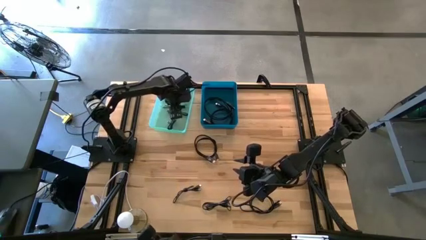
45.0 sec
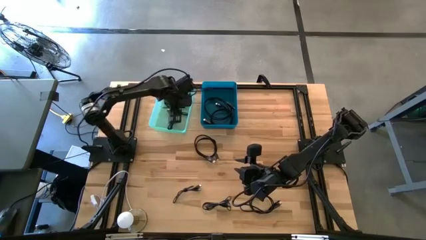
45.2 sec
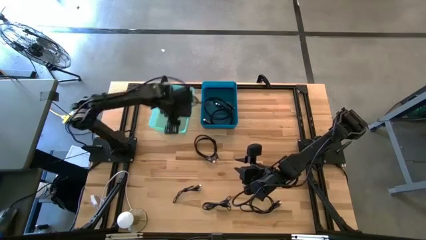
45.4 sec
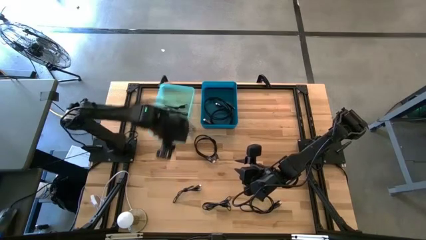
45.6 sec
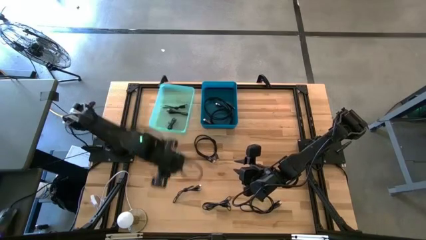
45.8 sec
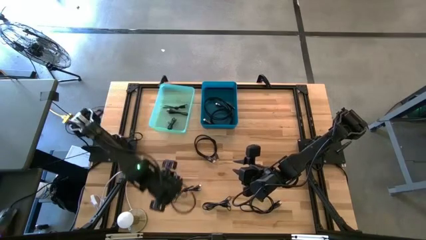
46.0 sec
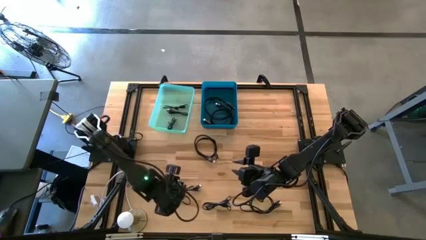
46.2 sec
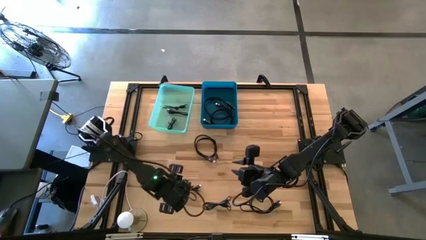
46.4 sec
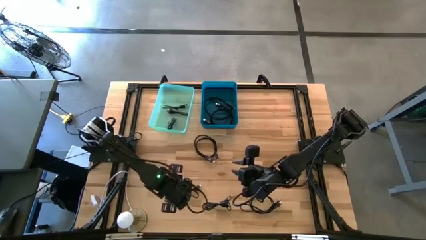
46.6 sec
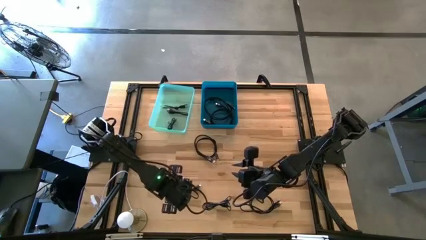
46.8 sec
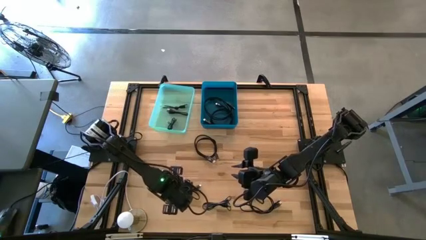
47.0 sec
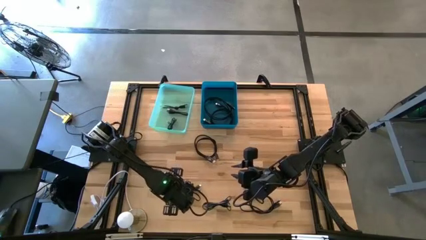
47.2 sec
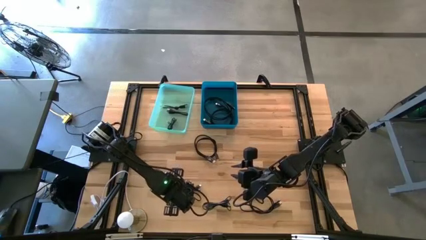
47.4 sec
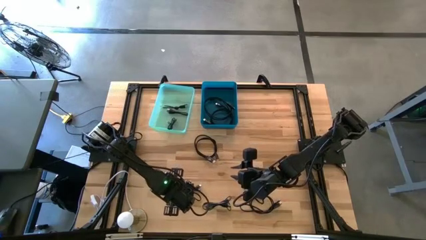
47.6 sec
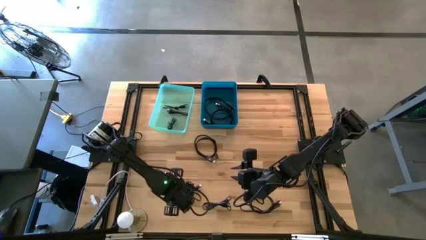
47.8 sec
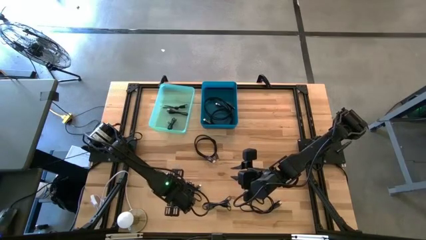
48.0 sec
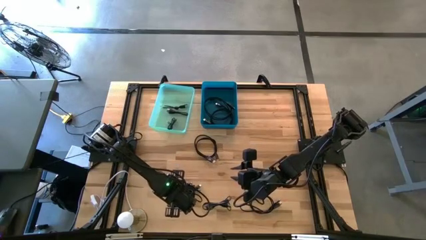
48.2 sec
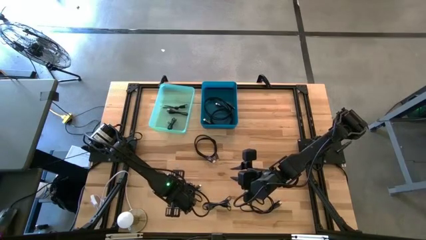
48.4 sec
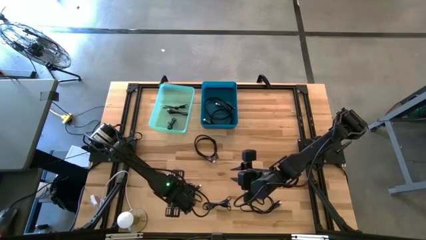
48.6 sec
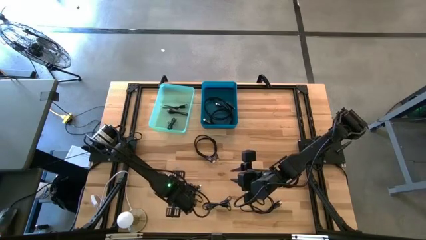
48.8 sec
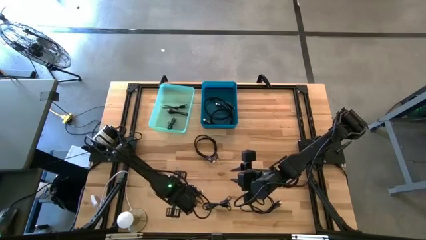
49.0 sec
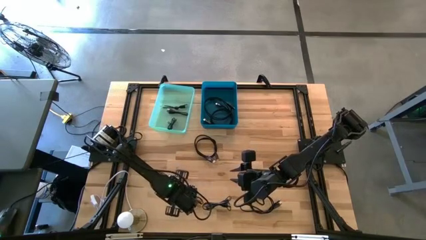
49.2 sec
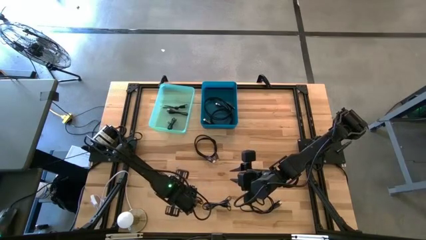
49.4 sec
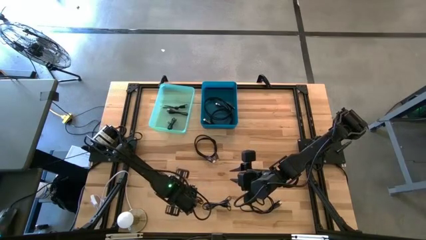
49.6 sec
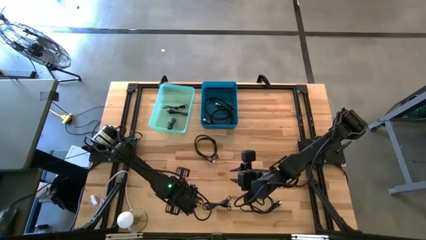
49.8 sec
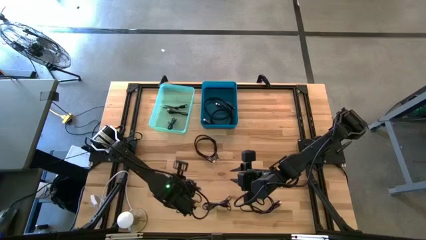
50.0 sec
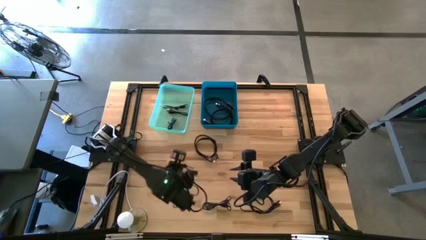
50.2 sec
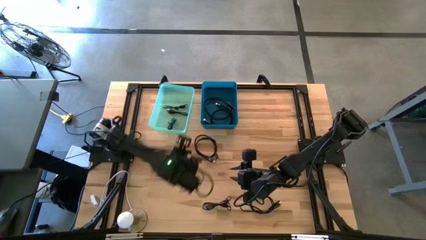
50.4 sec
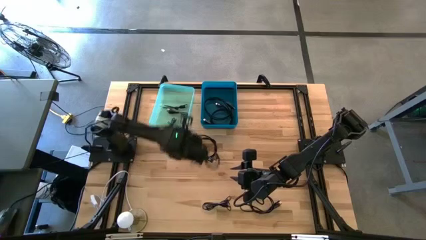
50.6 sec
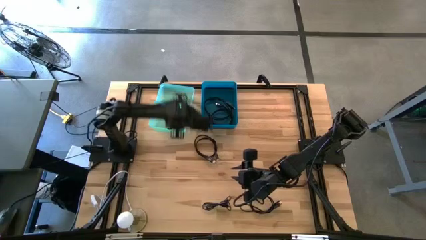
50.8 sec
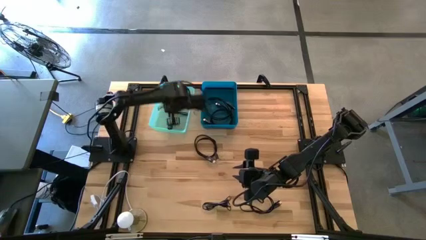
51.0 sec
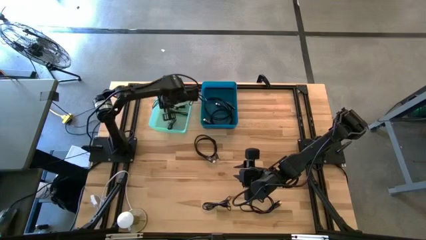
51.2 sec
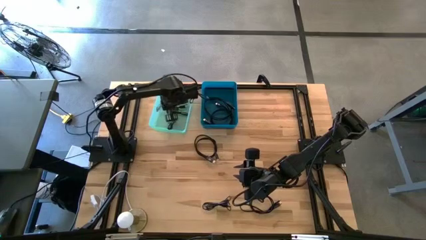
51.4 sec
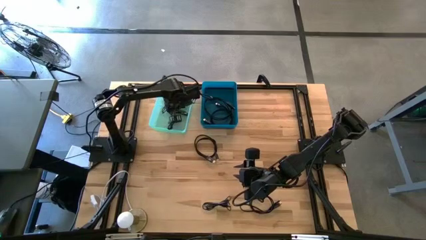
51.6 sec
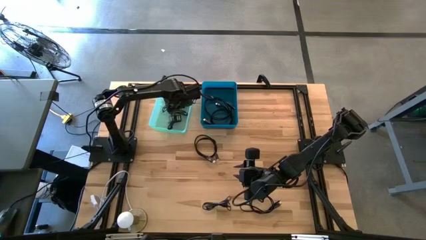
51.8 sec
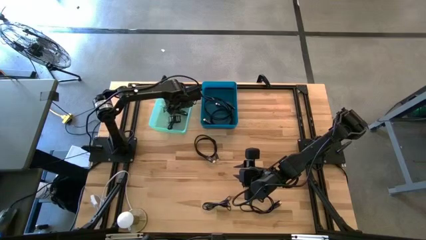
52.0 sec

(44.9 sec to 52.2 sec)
Task: Pick & Place USB Port
Put the black USB cable into the green bin

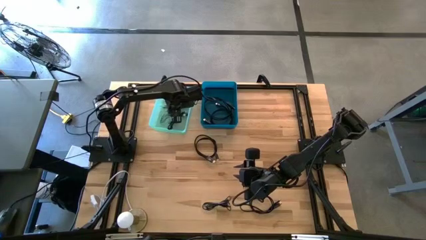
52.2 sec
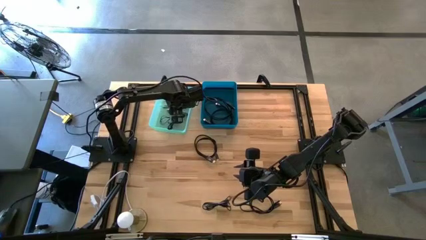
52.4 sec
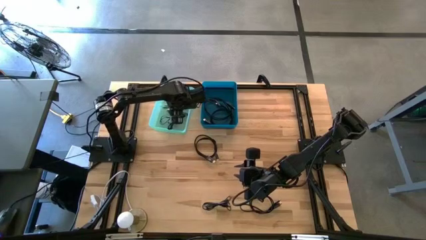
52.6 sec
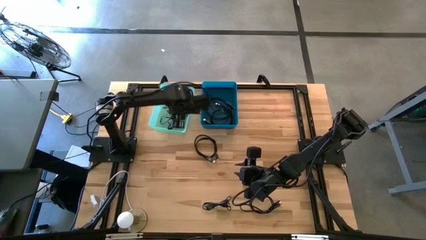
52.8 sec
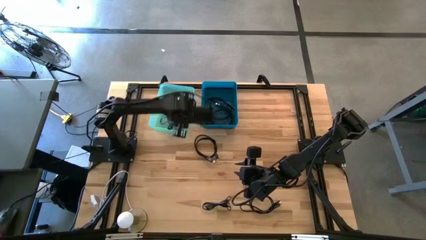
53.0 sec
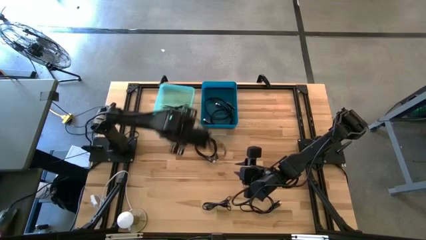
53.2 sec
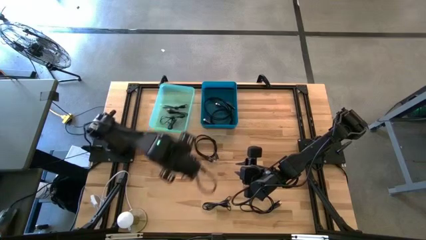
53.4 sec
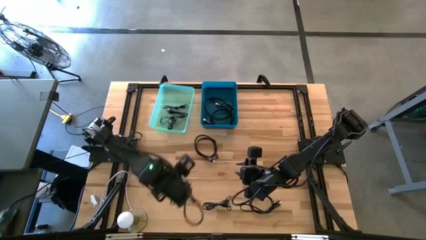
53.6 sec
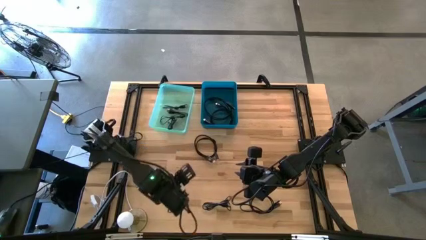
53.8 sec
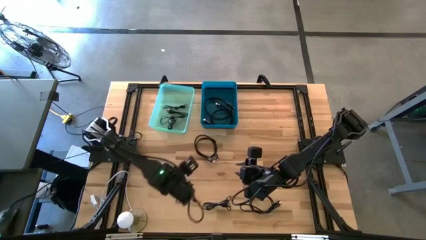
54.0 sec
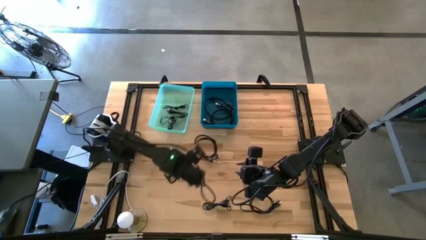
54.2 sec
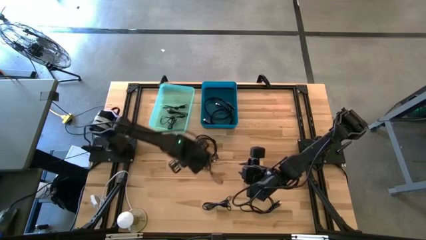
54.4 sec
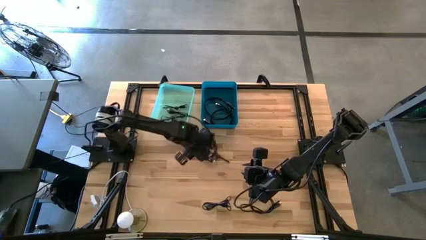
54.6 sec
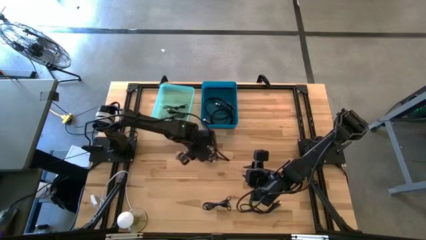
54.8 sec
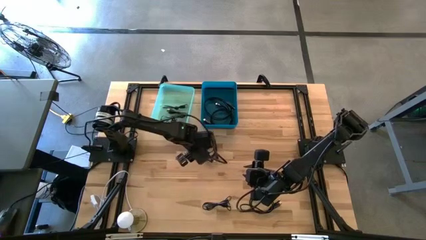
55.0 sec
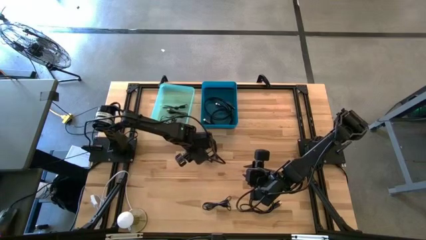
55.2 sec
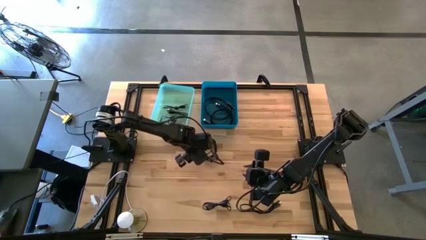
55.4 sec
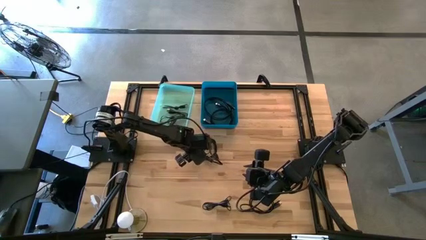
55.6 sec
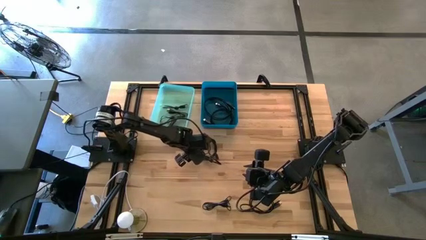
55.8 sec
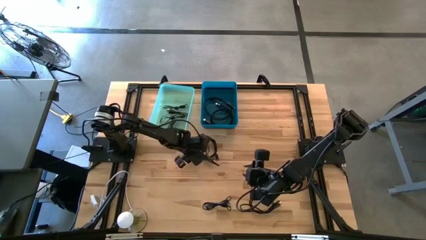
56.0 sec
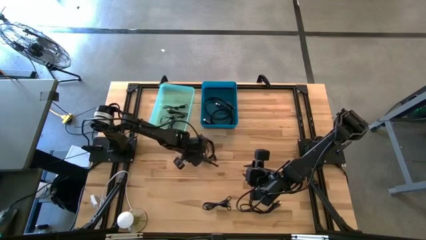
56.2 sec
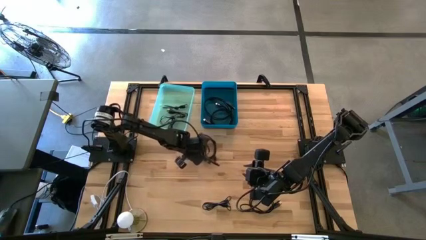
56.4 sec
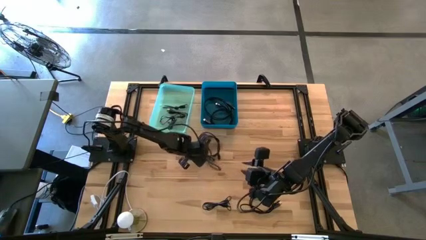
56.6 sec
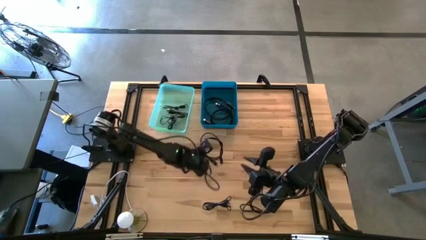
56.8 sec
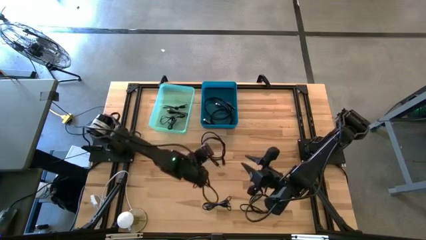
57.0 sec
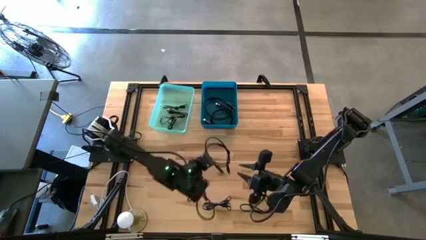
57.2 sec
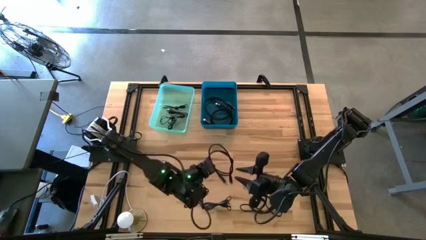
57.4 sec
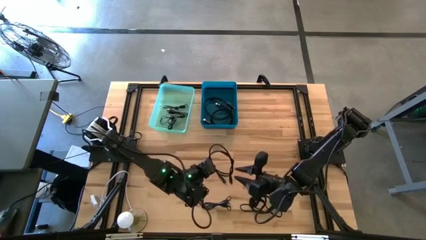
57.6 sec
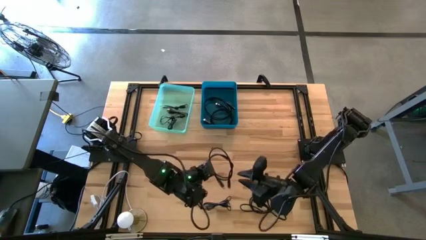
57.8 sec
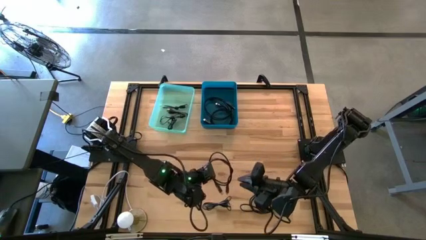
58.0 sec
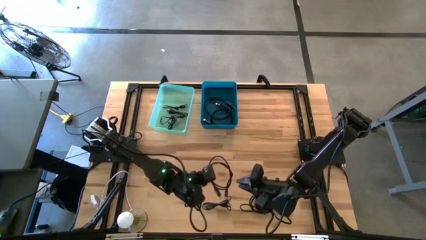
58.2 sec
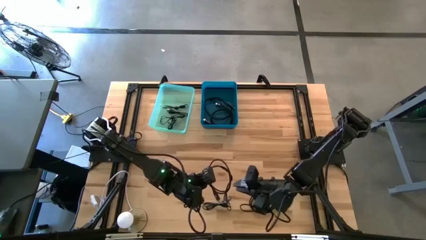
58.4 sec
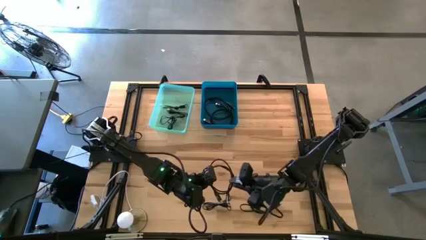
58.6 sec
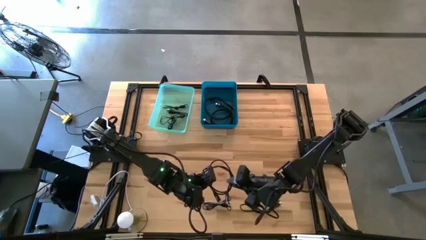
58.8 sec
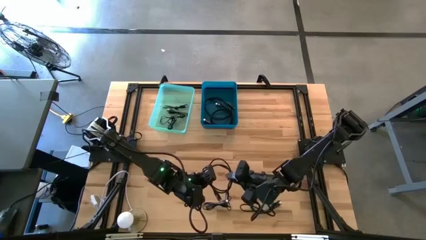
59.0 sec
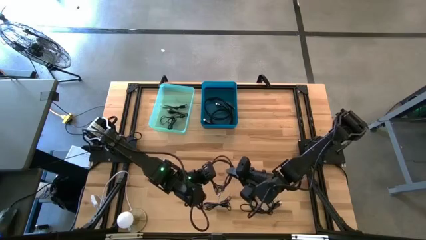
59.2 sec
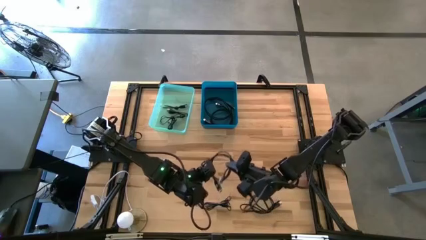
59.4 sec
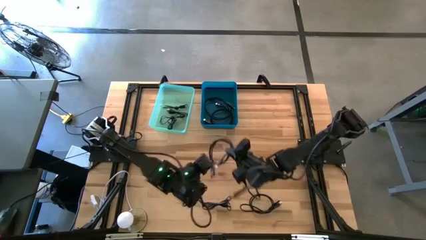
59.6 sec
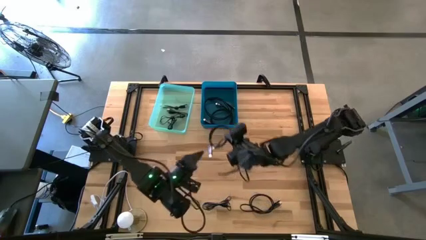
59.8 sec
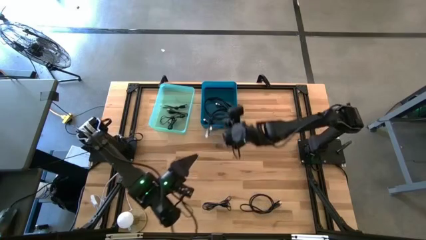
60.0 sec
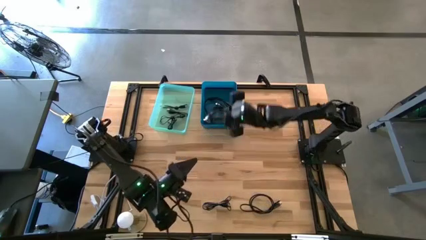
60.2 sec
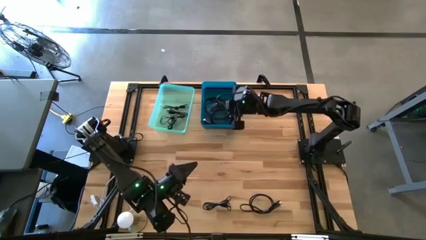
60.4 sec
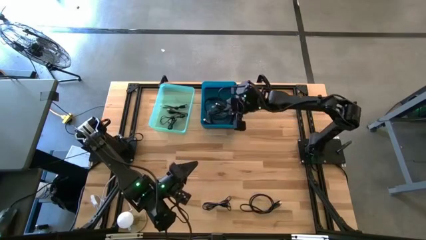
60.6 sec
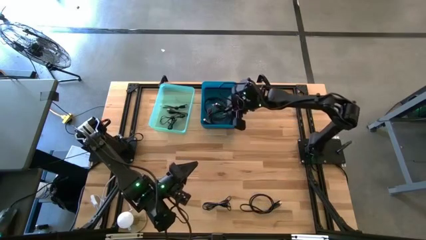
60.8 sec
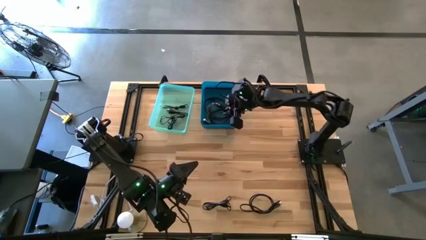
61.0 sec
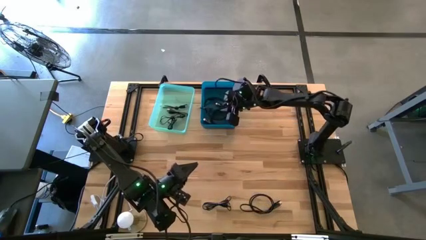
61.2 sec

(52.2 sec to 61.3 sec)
Put the black HDMI cable into the blue bin
